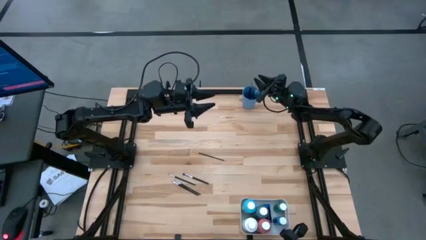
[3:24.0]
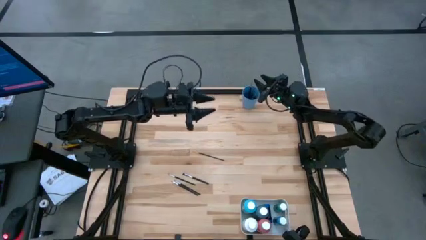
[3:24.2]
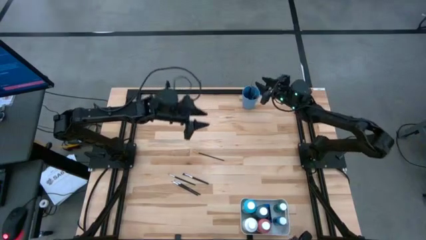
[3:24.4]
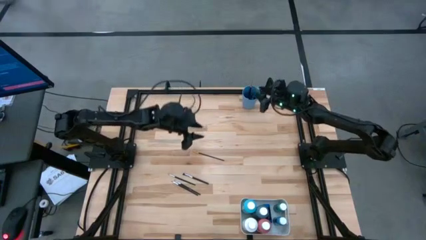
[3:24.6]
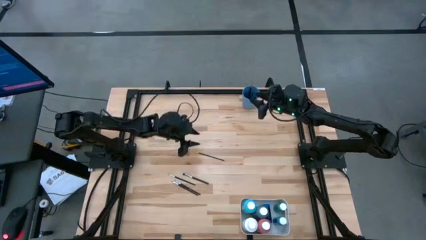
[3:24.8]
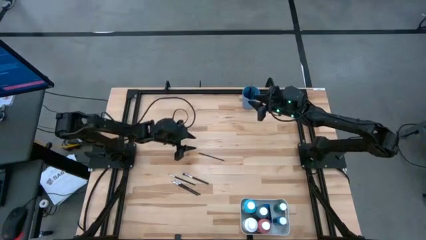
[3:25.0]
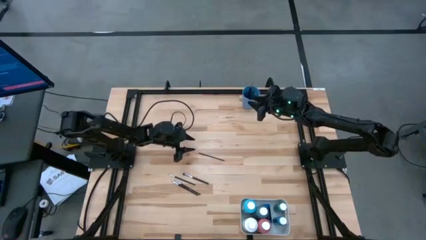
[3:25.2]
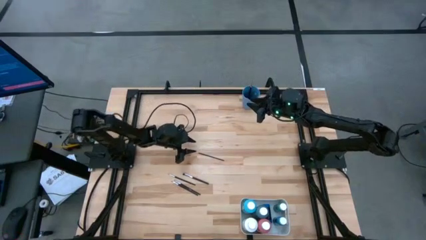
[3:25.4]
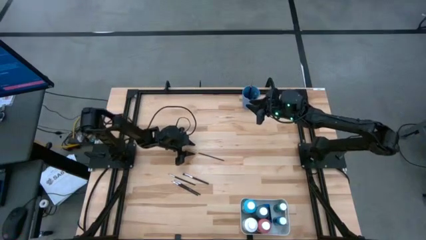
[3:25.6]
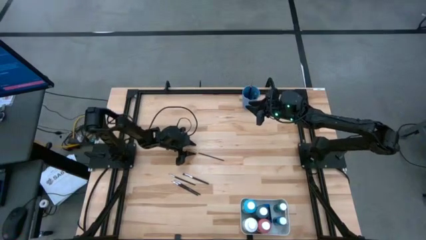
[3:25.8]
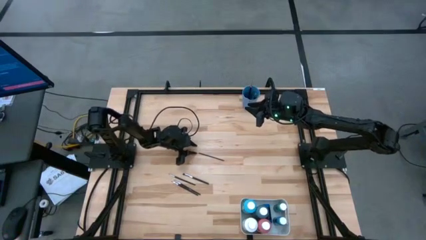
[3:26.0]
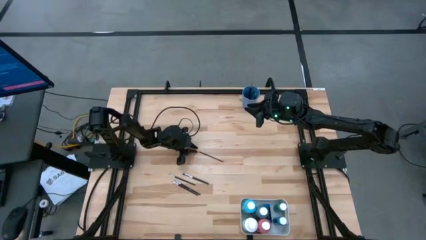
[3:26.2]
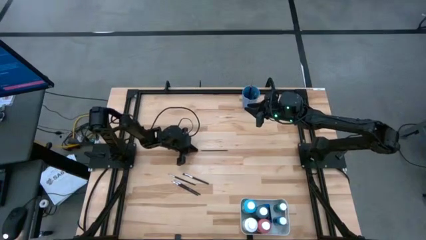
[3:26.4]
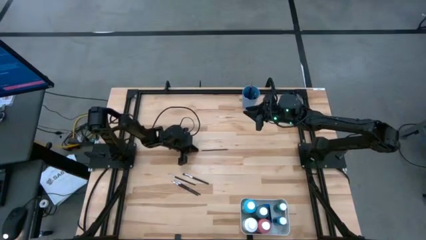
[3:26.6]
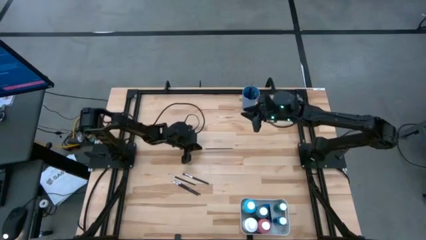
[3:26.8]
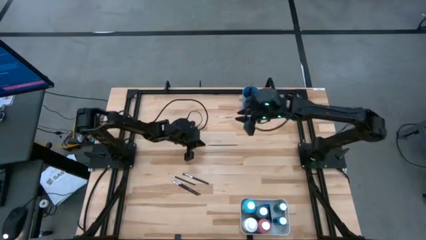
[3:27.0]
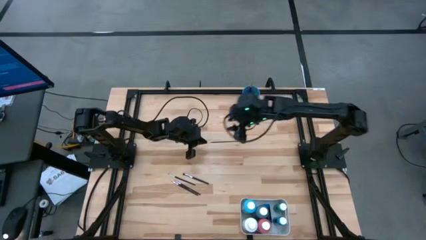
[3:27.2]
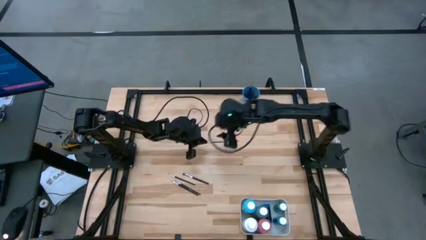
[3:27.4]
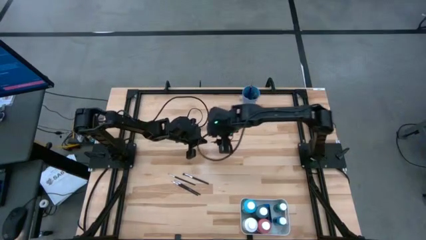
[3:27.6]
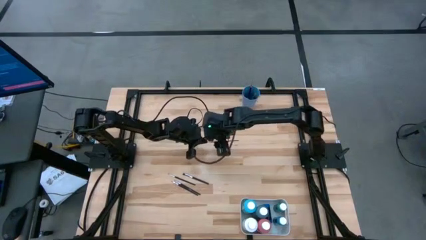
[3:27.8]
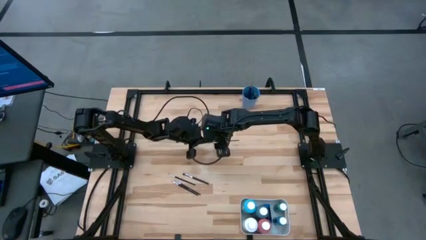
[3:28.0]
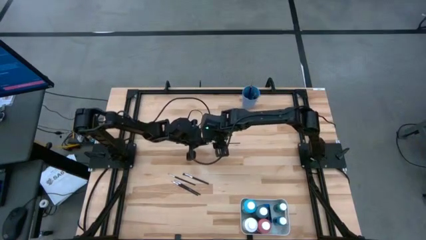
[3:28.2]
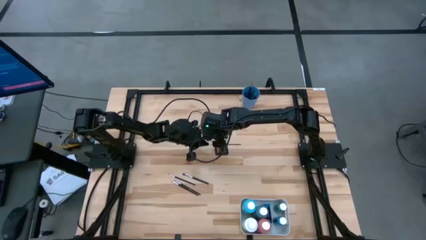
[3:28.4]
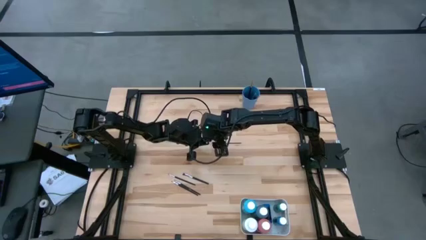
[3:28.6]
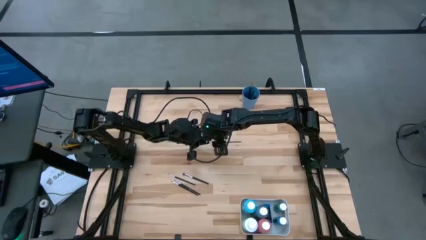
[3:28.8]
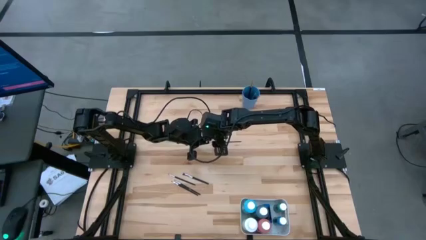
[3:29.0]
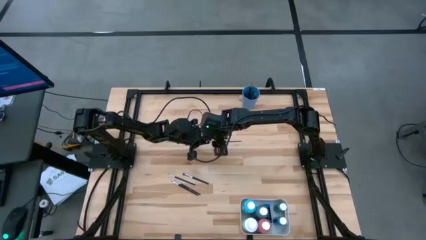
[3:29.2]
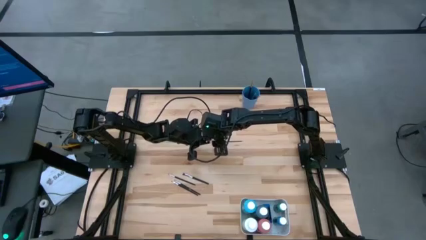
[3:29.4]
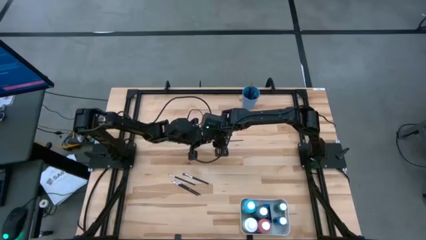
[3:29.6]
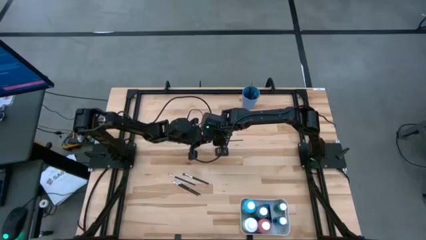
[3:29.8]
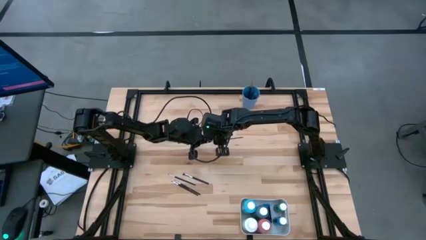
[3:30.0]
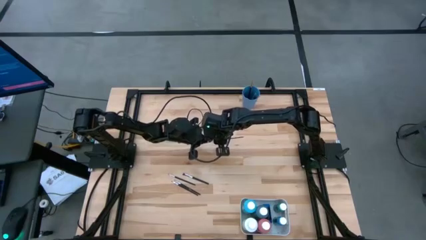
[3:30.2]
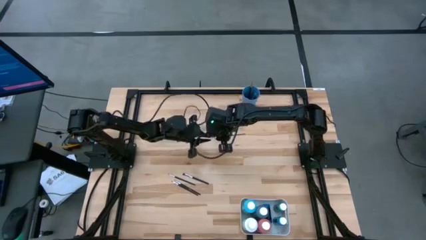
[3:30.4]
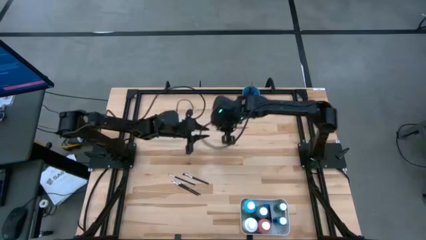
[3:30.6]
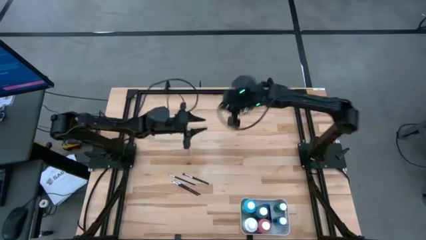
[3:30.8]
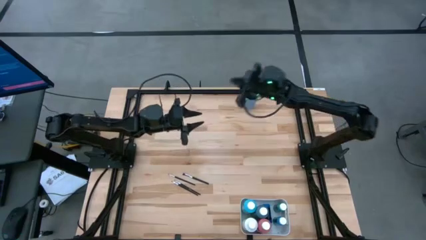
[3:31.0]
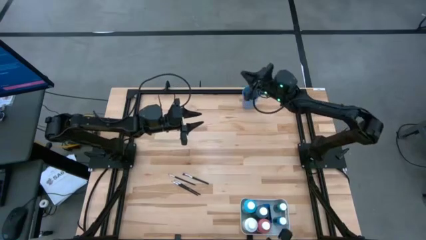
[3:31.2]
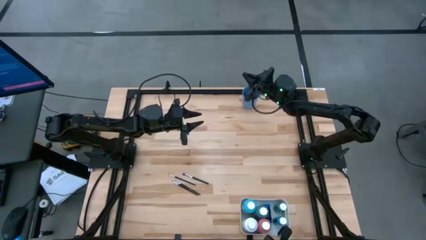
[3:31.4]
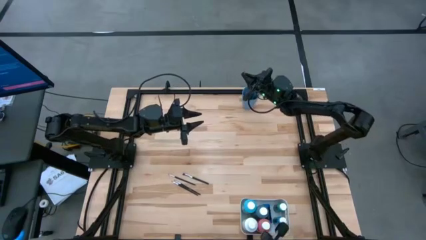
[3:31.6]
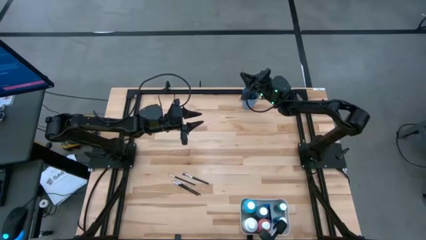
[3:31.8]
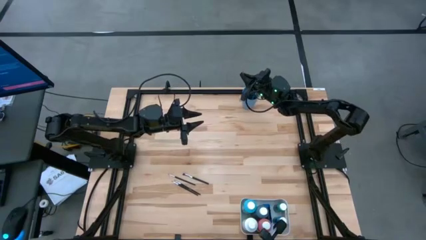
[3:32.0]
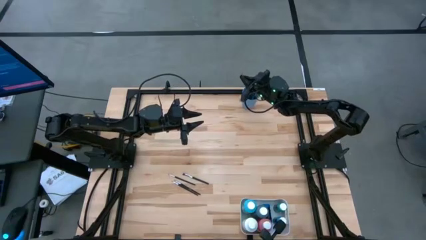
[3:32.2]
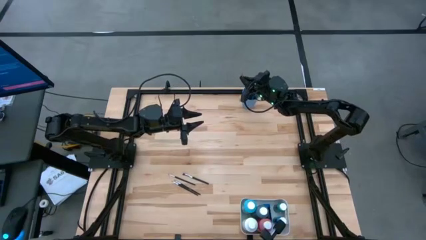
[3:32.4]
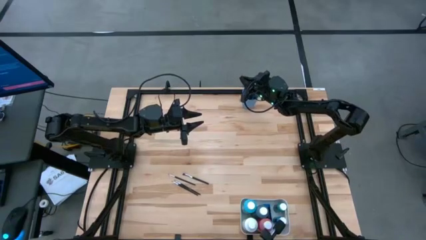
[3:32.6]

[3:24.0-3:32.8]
Task: Pick & Place Paint Supplies
Put the orange paintbrush into the blue cup

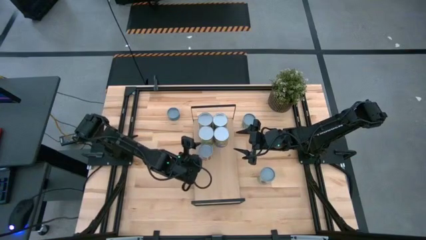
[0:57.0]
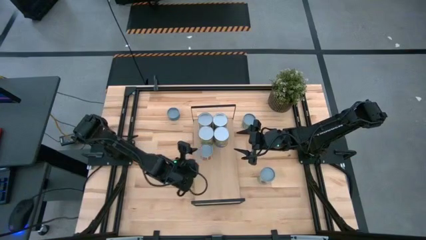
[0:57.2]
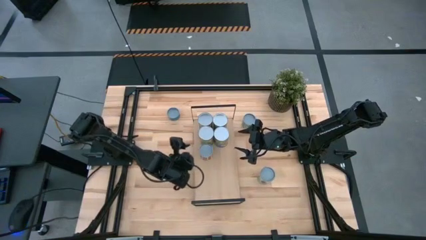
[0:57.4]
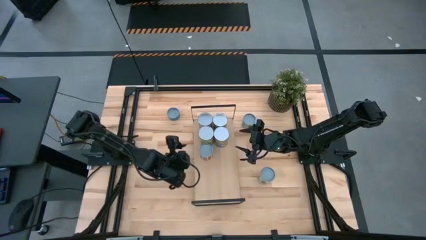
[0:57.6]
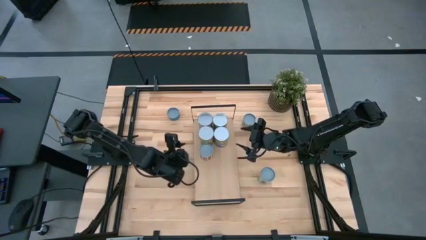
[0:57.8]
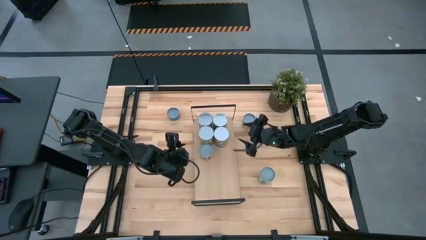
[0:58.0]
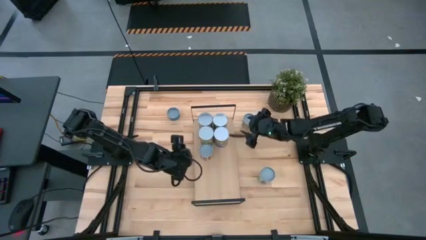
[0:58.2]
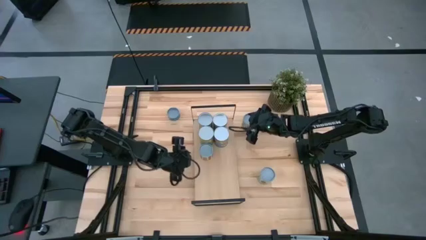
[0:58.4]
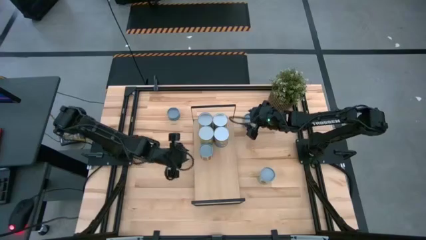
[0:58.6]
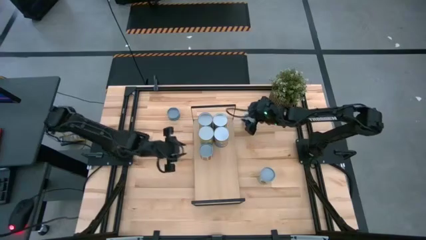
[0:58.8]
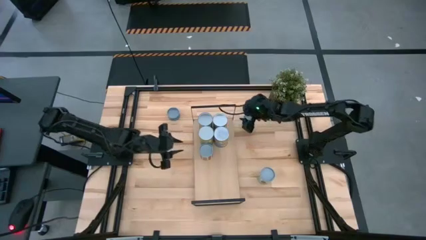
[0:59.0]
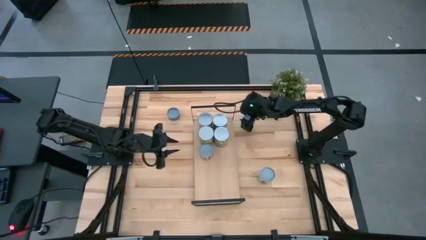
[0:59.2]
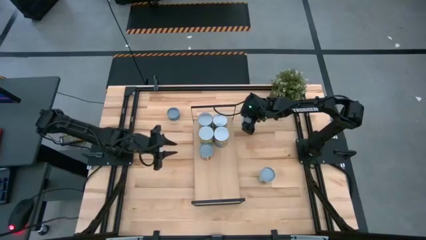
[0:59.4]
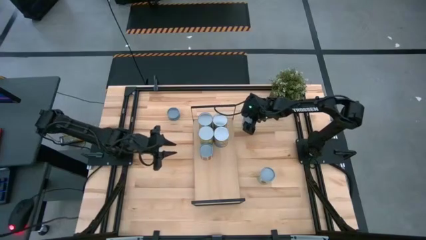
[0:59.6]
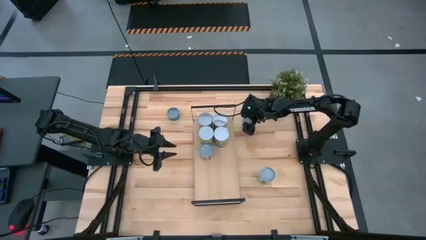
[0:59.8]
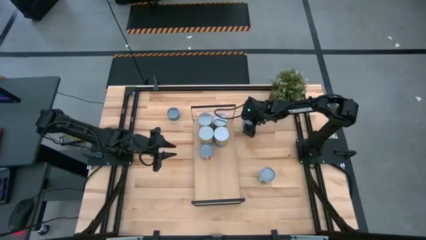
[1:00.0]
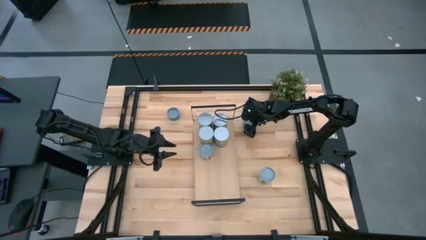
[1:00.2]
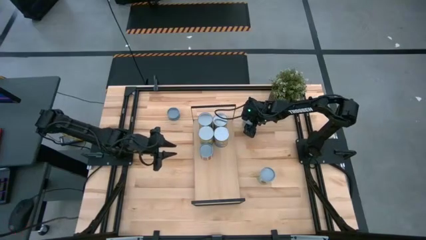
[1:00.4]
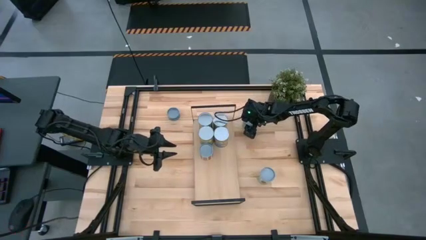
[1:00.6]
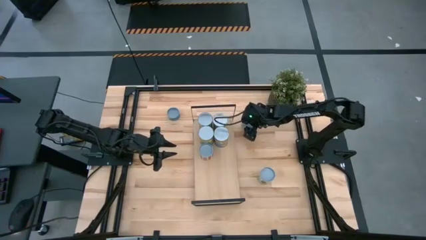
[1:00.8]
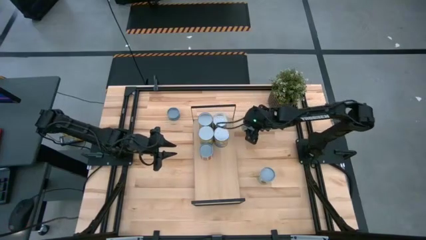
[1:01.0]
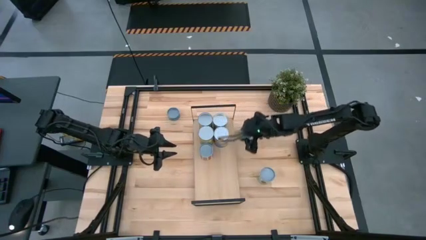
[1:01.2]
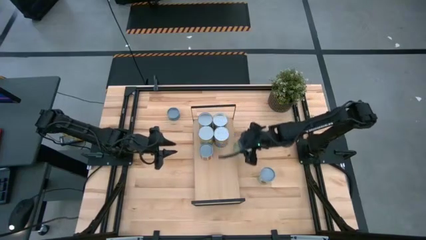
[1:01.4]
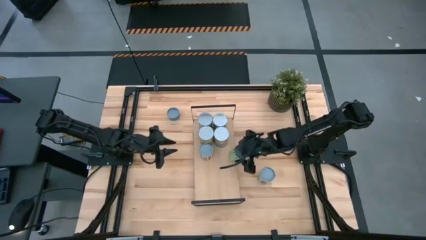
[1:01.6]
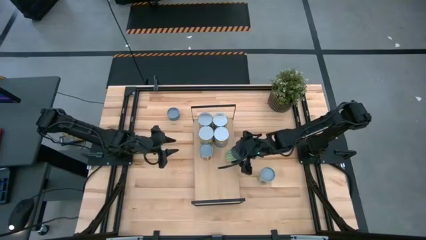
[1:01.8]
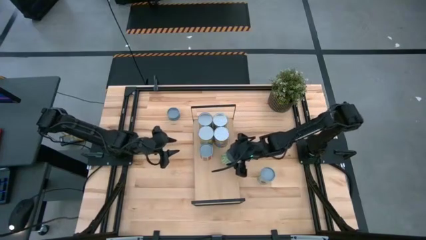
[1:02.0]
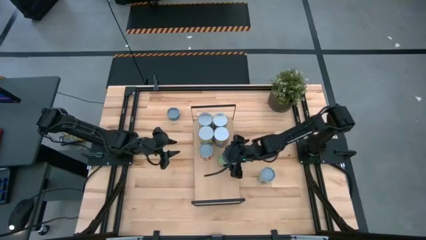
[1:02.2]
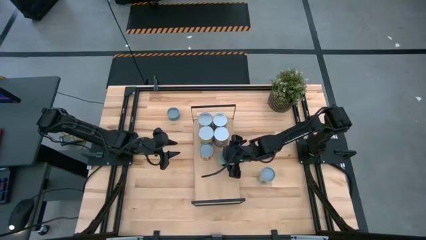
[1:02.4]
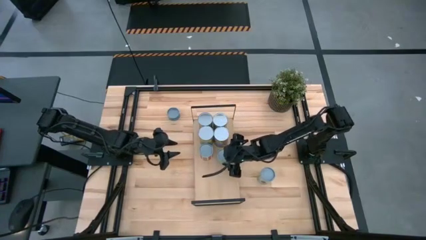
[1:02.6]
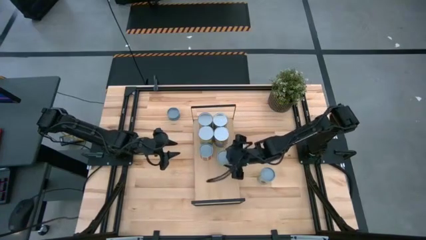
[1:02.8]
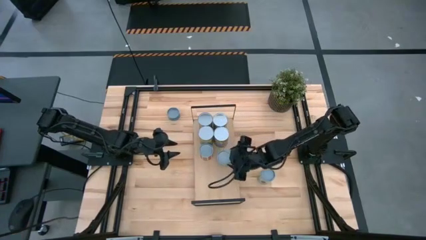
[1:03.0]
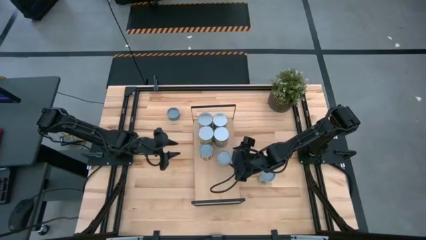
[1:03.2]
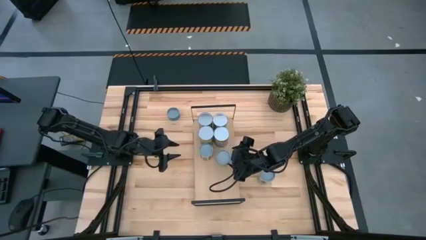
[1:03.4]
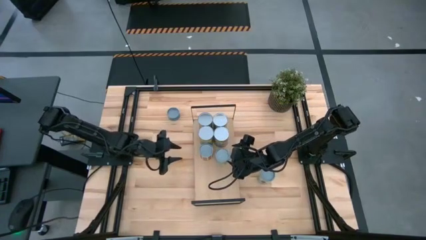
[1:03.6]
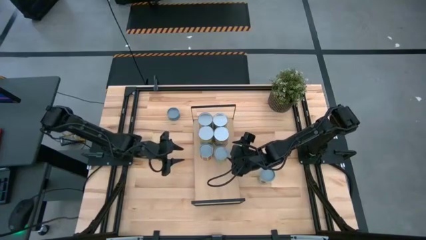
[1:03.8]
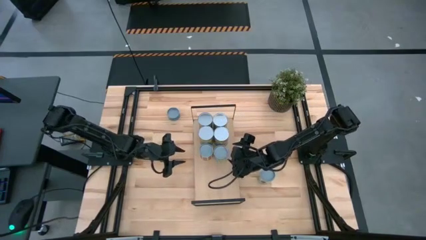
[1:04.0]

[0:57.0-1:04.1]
Task: Pick and place cans onto a shelf
Put the canned green peas on the shelf
